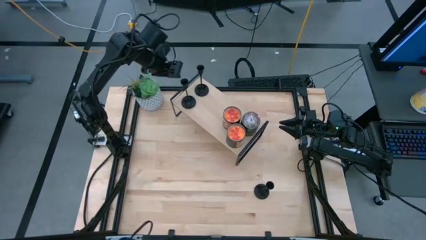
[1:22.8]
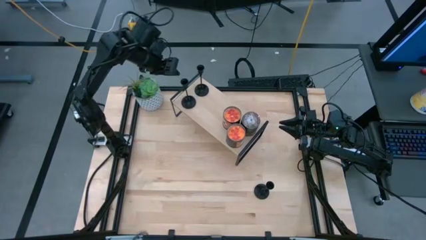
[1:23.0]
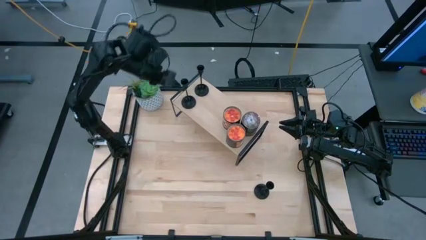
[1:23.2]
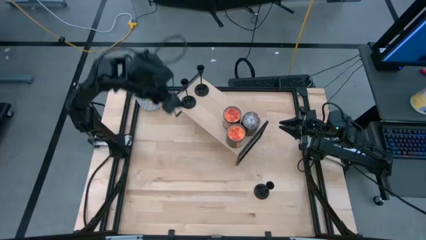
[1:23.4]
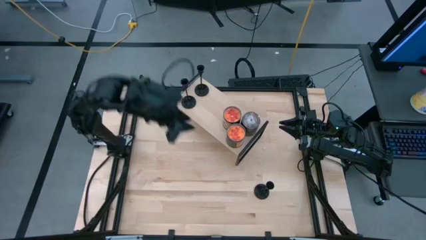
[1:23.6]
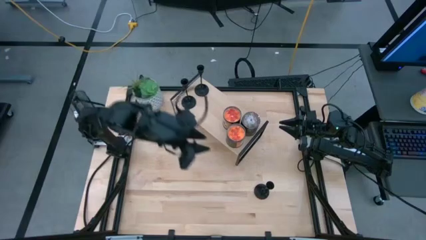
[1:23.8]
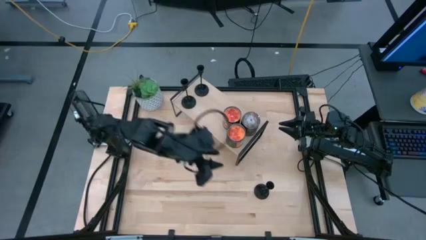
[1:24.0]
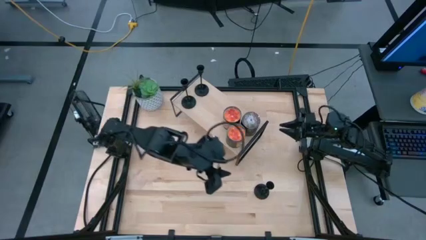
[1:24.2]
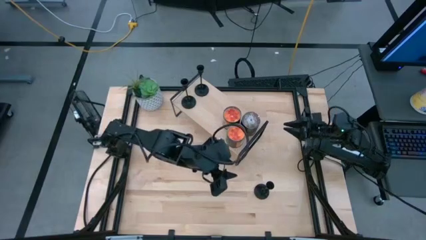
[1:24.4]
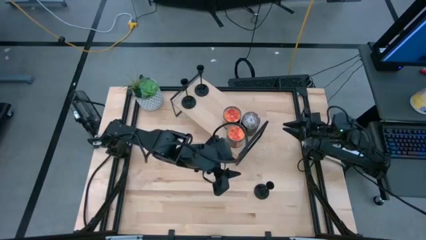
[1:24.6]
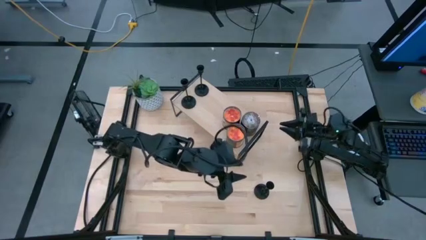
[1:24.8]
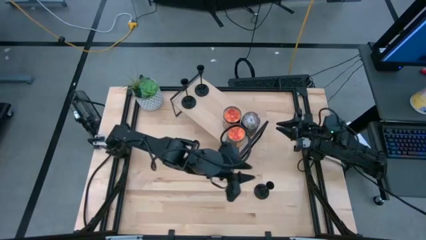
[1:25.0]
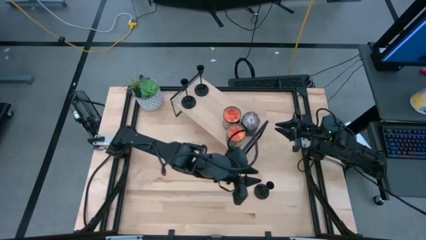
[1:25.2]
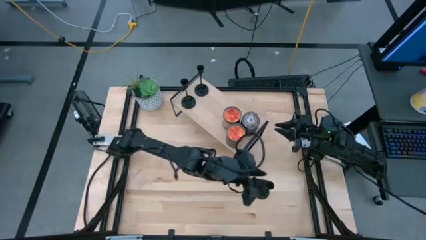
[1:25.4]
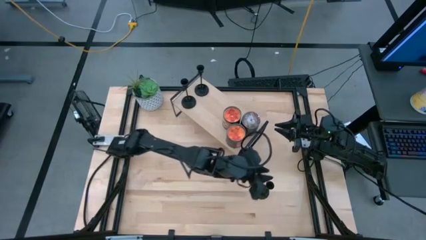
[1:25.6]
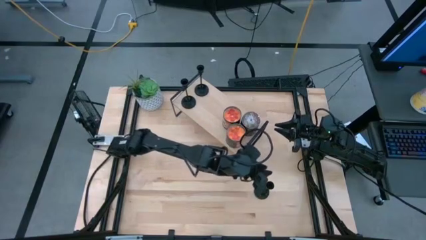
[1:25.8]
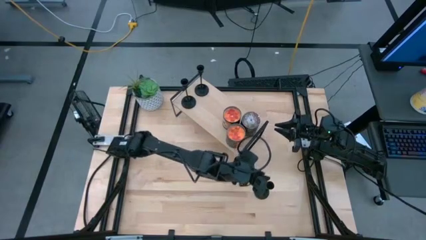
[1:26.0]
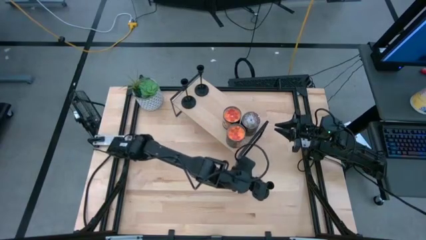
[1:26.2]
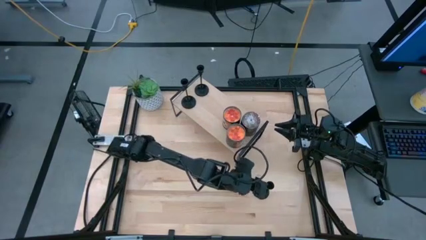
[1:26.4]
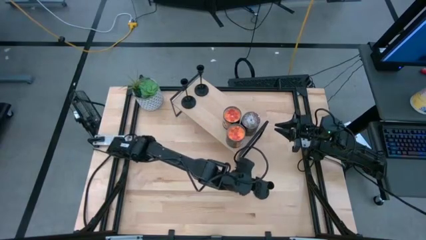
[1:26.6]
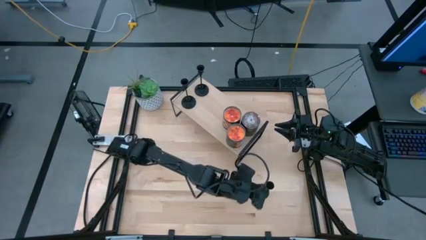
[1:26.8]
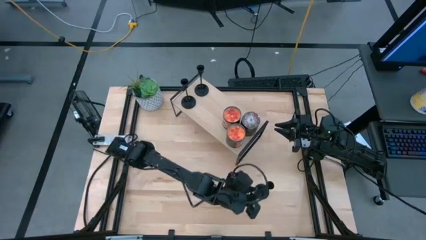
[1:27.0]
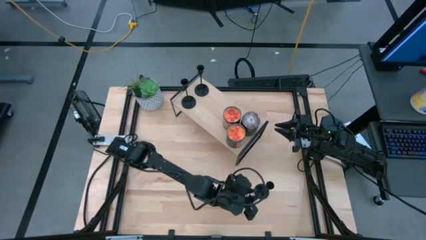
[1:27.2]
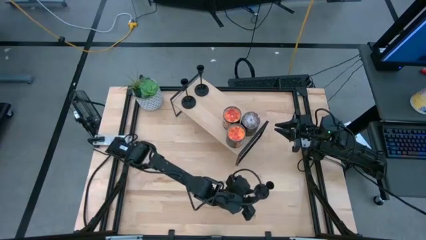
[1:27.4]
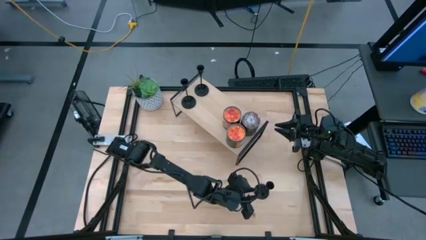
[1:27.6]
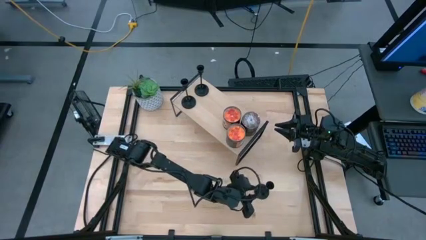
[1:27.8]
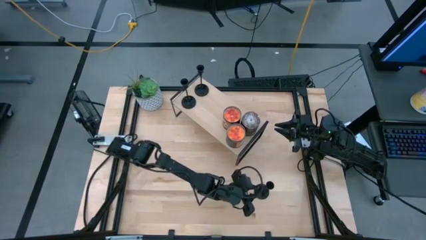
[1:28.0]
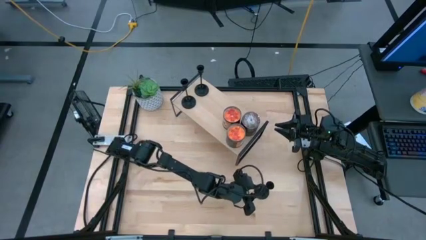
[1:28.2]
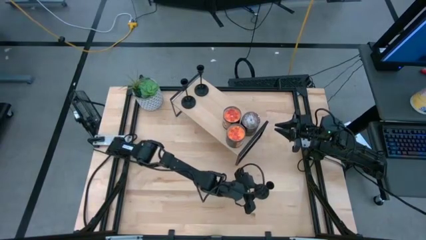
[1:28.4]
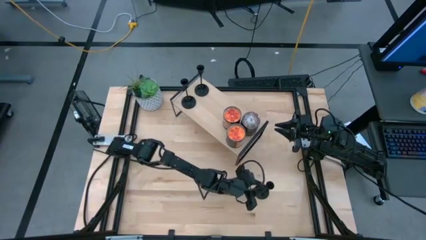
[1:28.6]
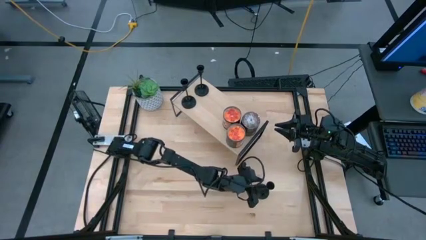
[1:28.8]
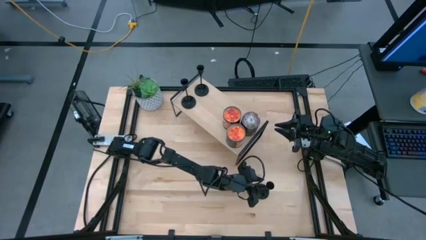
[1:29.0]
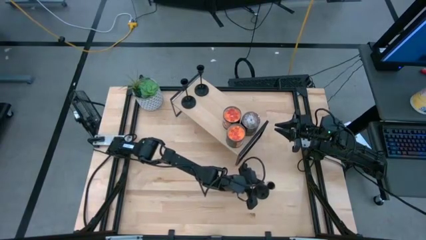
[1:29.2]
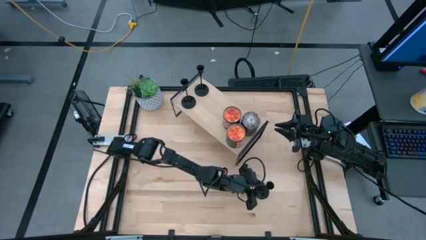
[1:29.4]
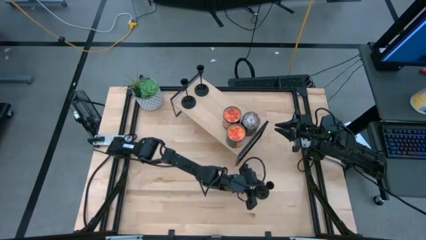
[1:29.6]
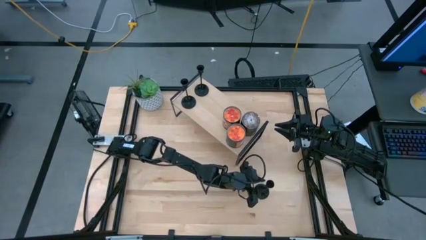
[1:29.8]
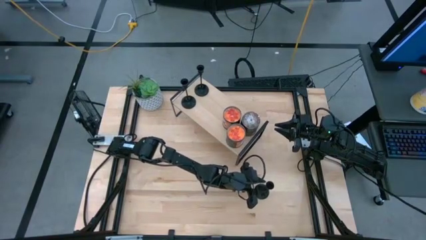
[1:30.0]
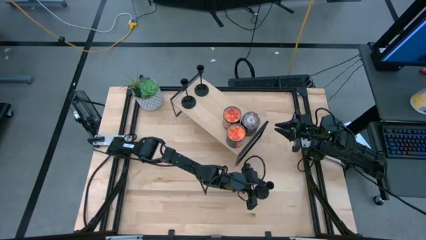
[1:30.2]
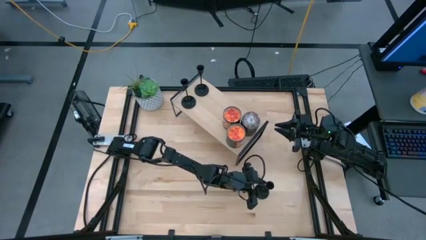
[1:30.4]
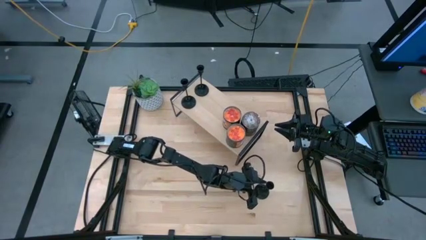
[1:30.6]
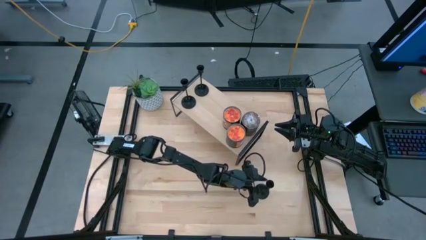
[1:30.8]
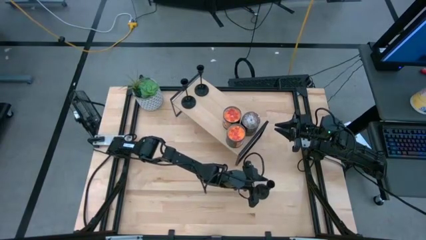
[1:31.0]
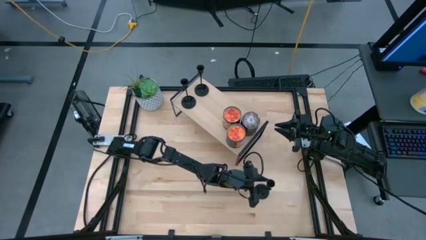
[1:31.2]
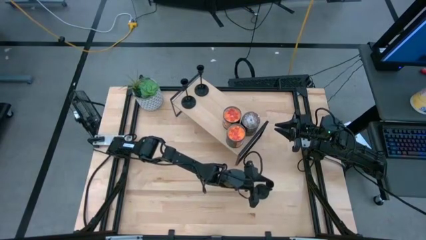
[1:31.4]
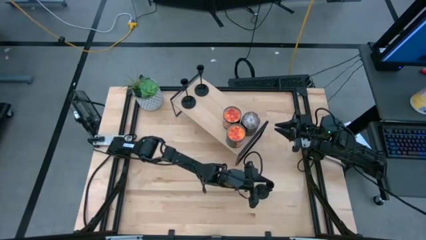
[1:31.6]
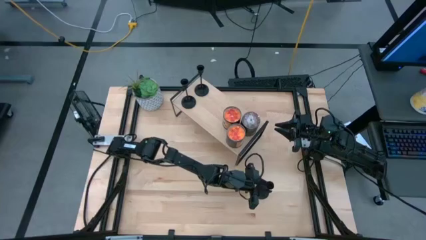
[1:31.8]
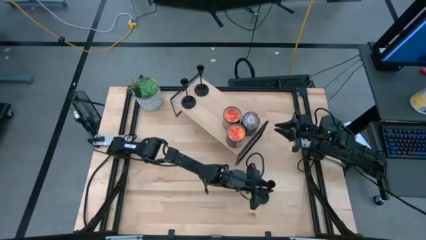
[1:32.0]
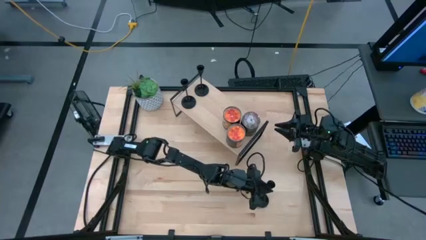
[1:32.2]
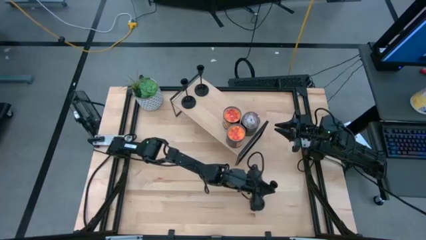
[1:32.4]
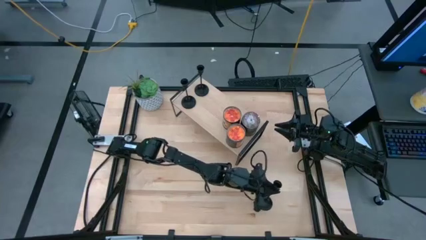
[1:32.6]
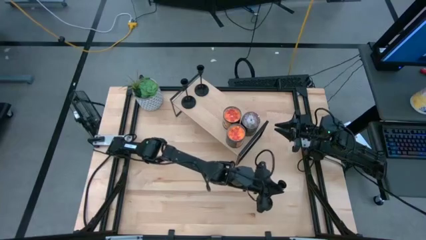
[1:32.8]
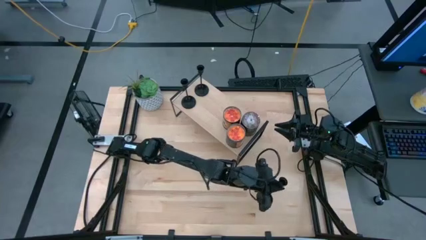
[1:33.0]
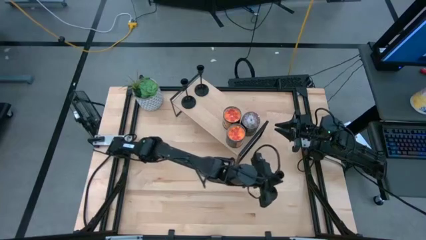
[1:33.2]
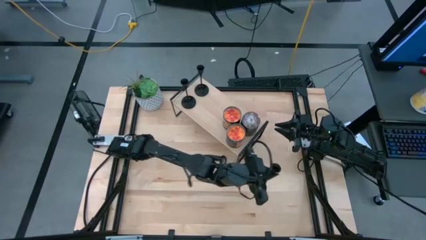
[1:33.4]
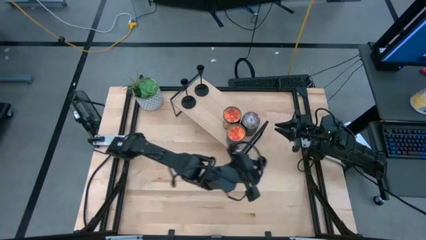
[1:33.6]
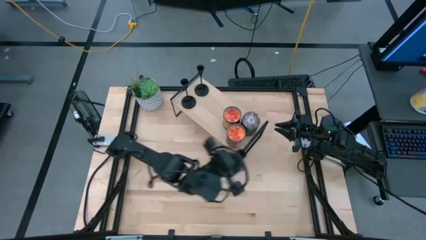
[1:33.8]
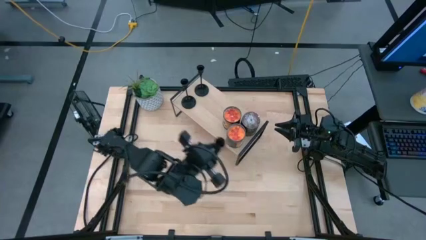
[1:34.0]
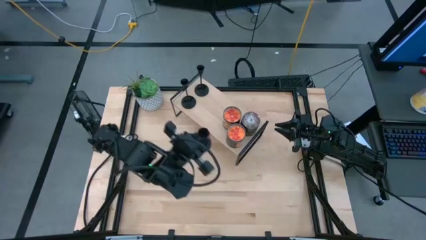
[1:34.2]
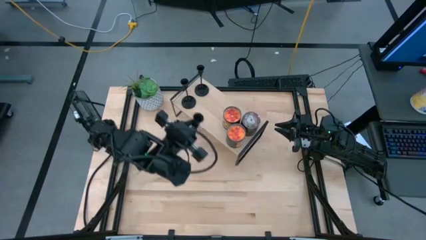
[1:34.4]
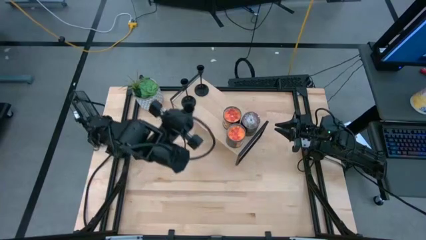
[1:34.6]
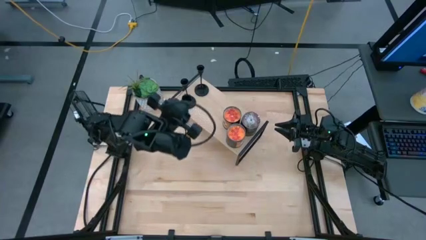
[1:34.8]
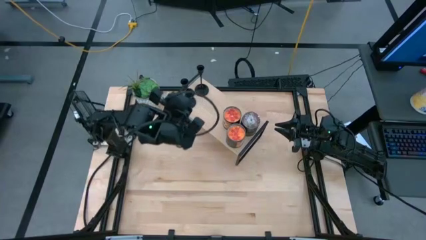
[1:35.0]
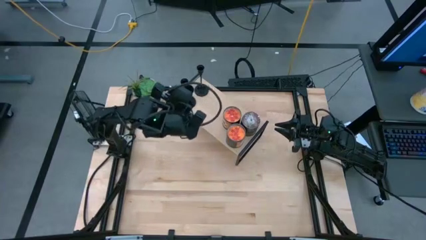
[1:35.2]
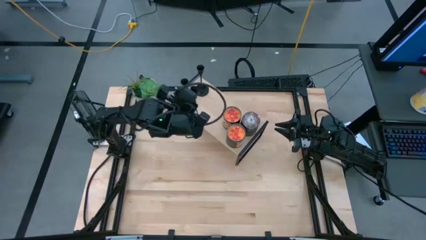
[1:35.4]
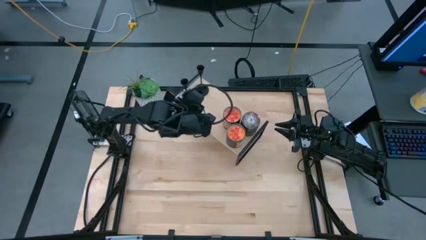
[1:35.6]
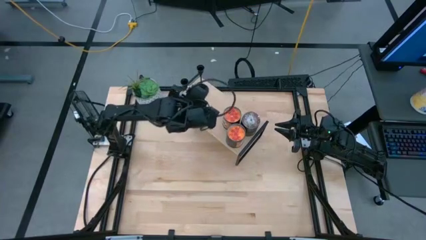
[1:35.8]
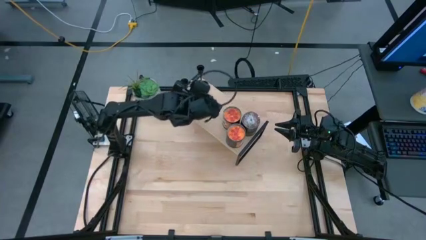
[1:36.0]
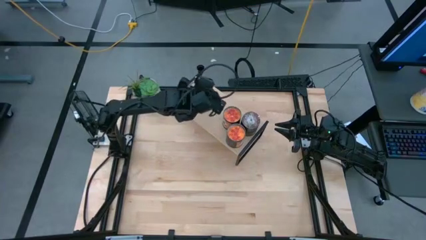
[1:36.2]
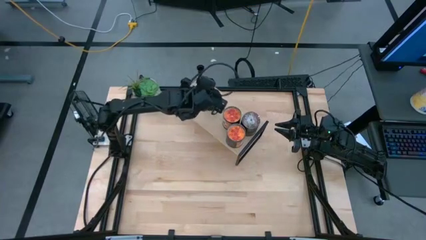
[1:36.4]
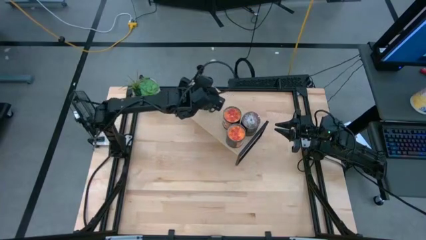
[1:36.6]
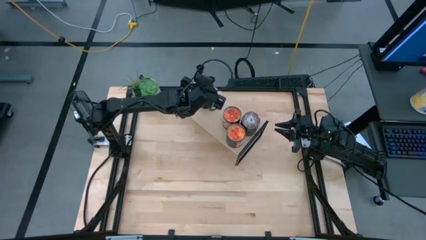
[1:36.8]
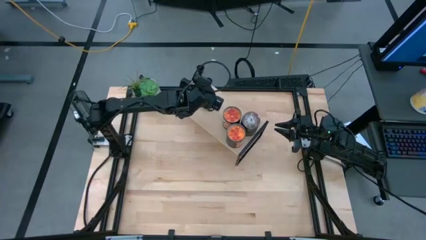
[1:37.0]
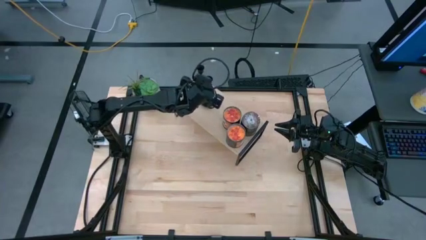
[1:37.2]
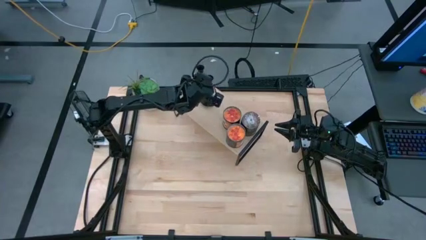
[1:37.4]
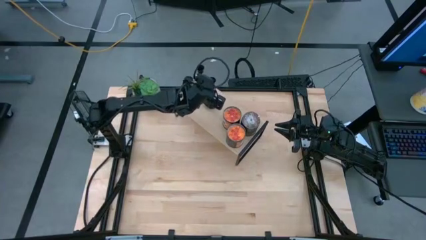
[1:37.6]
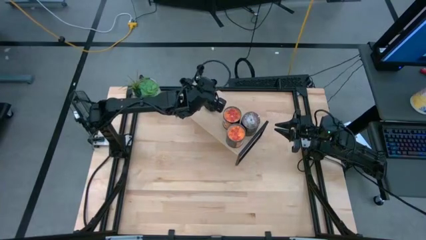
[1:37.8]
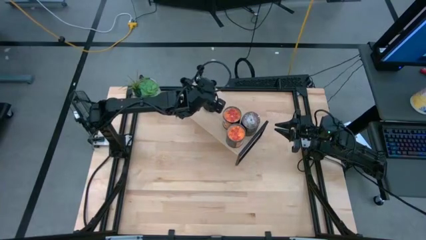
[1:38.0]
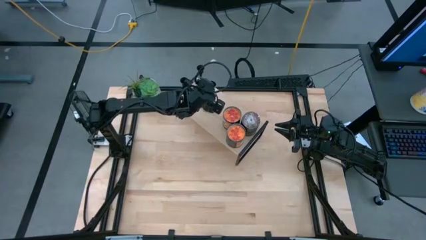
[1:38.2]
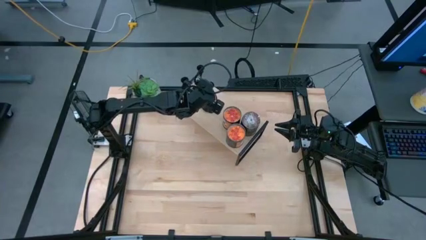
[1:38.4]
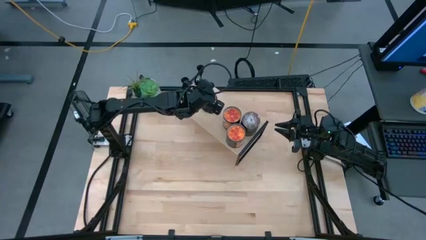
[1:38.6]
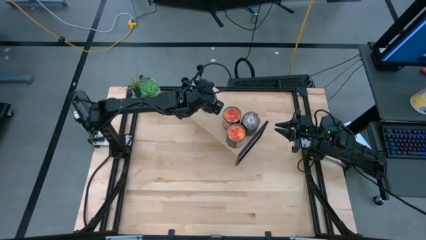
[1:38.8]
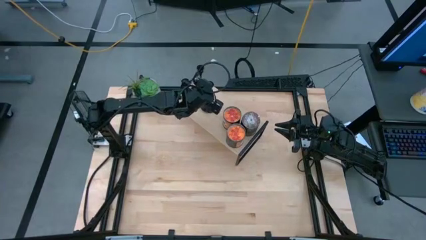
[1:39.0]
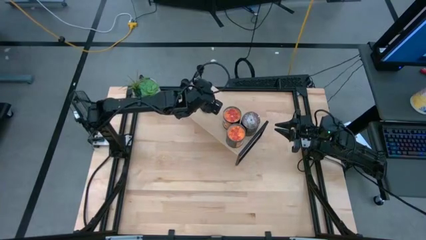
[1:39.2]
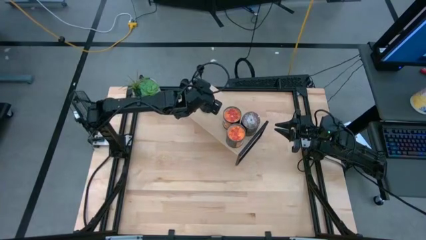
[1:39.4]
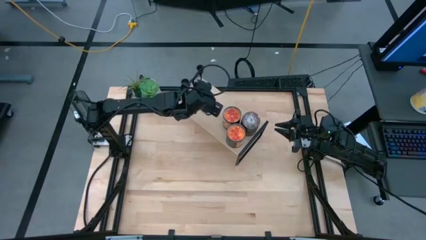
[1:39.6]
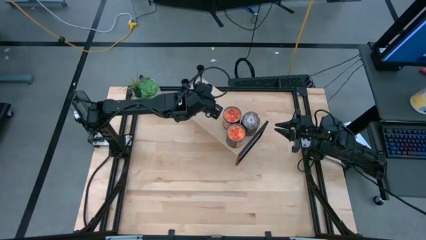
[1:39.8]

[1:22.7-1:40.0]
Task: Pick & Place candle stick holders
Put the black candle holder on the shelf
